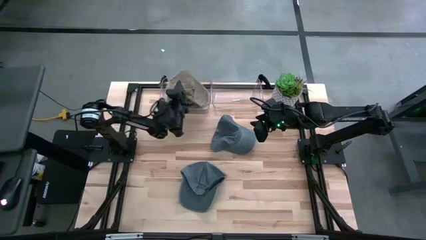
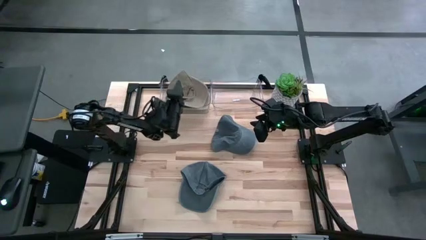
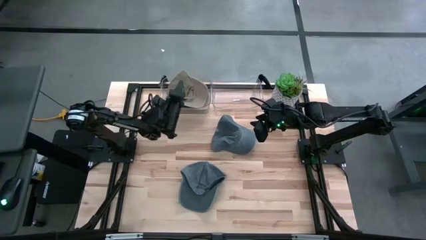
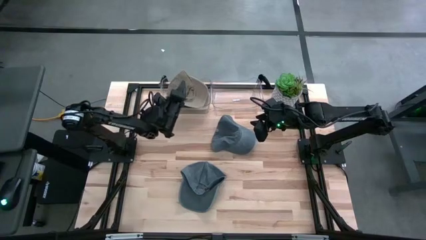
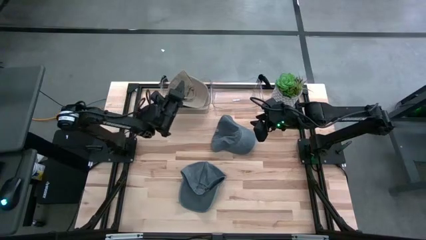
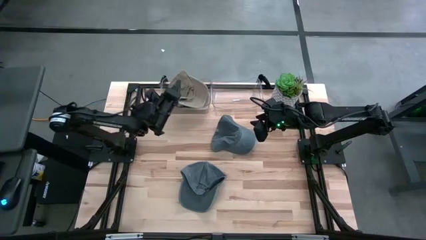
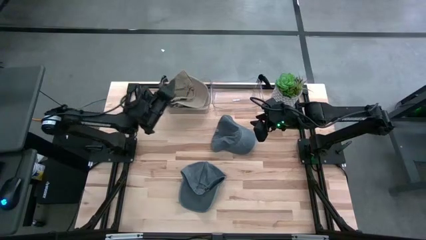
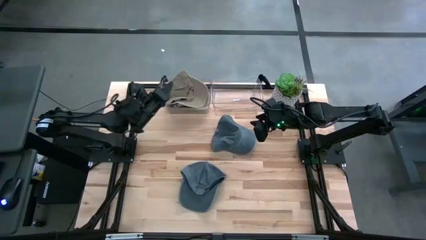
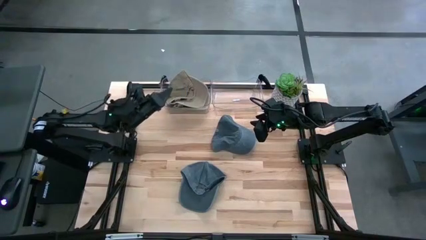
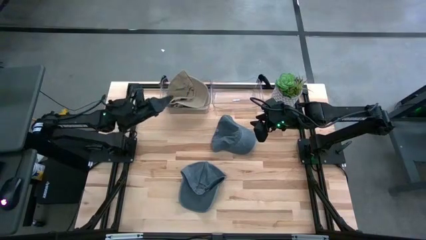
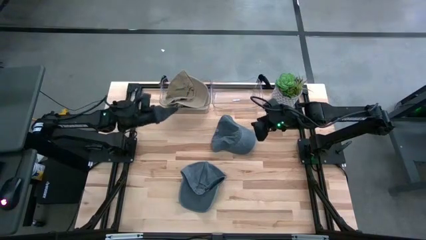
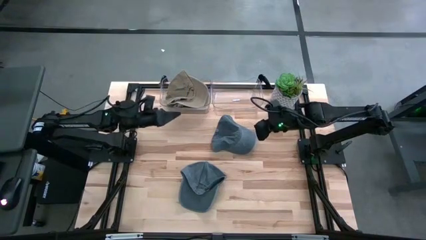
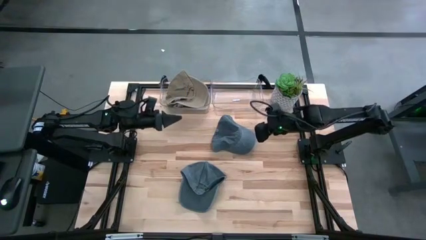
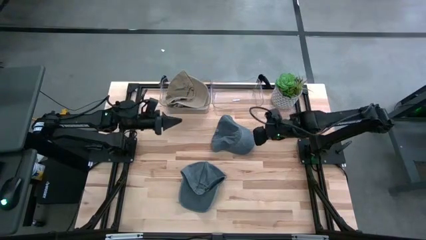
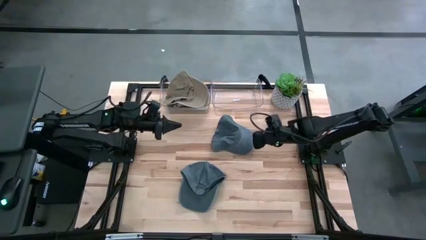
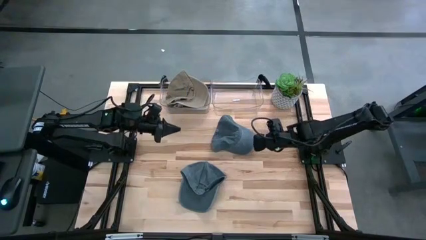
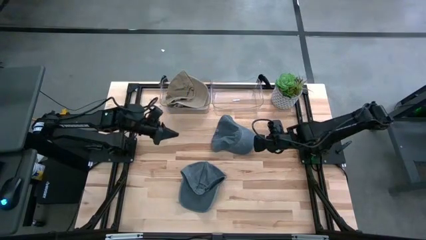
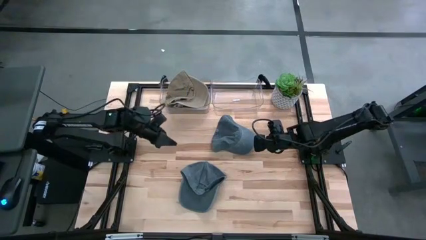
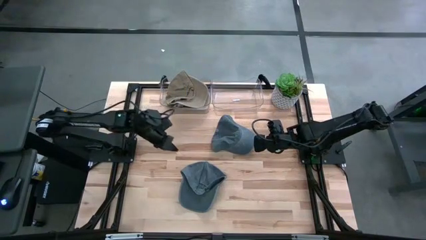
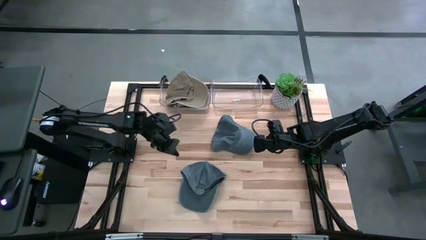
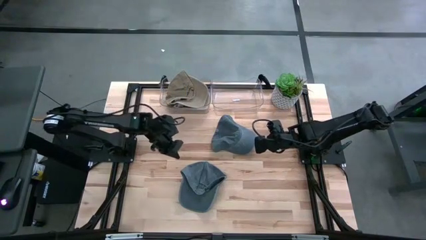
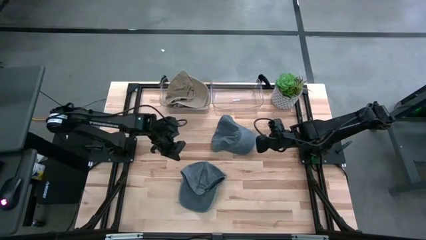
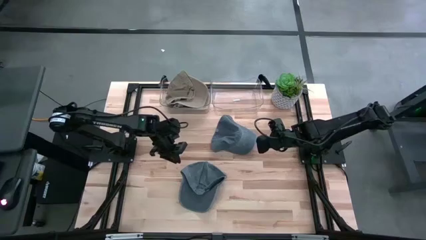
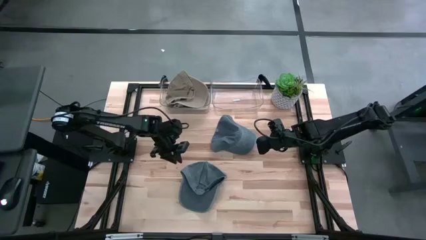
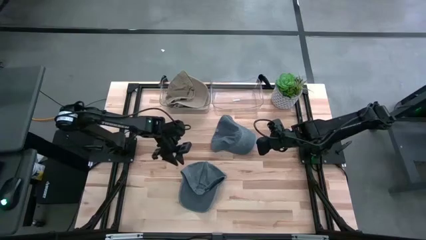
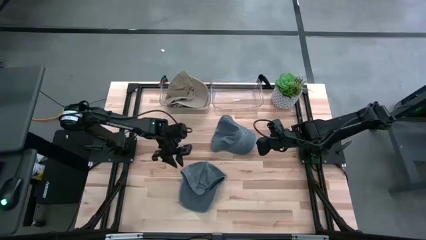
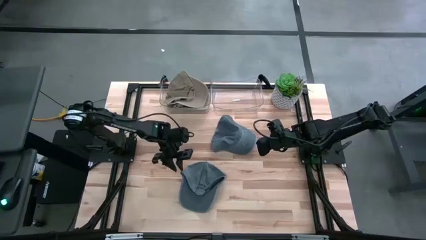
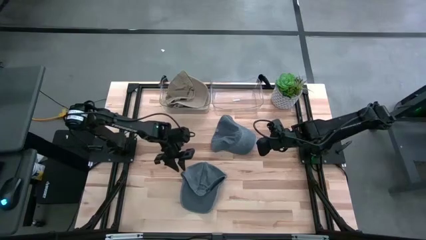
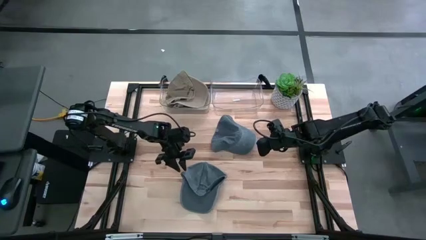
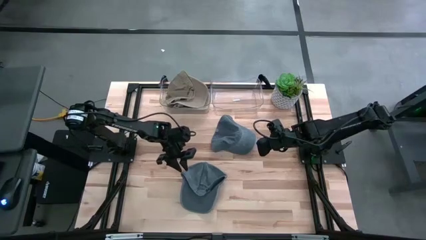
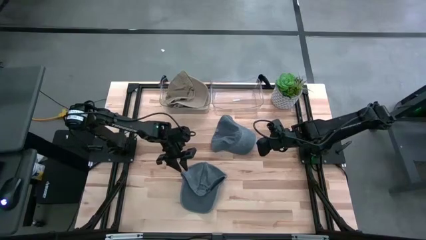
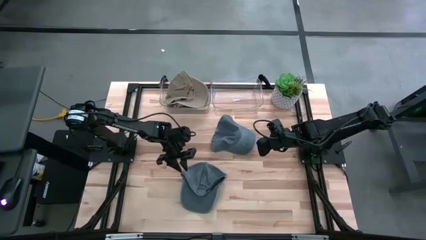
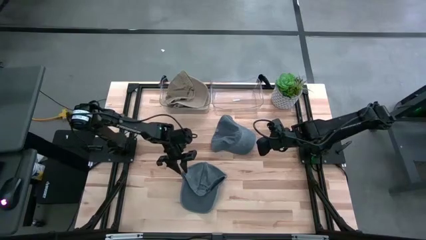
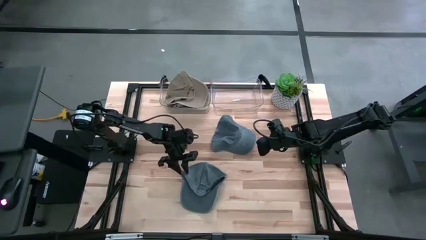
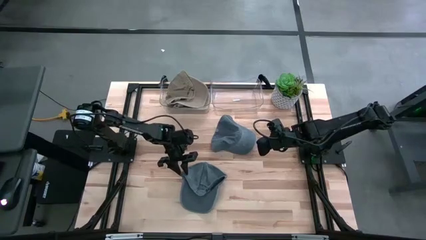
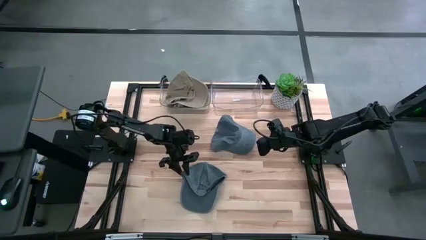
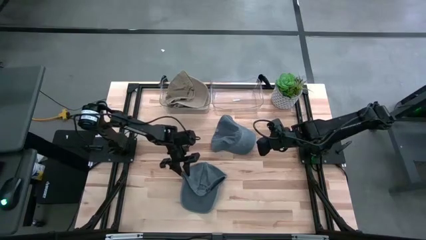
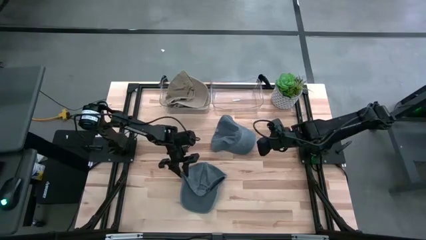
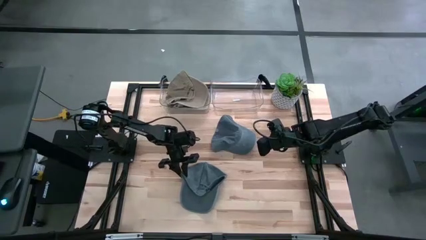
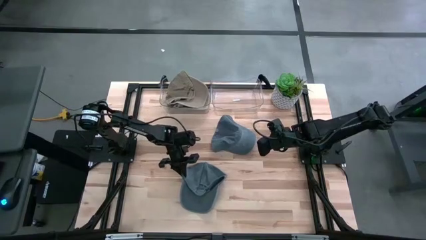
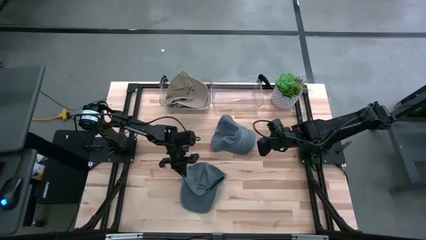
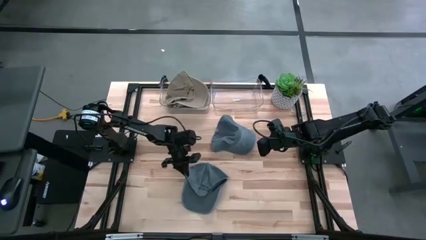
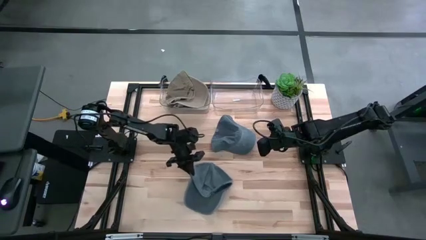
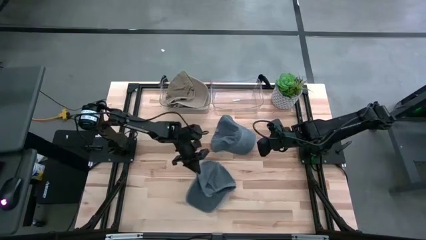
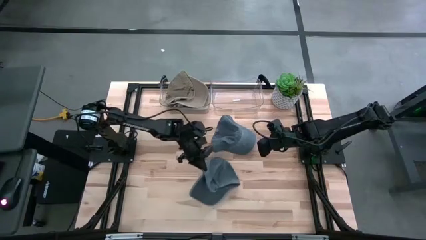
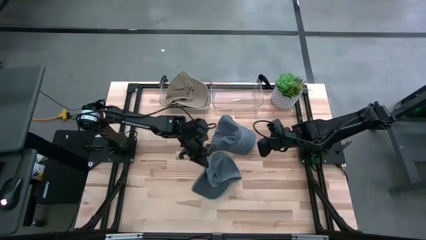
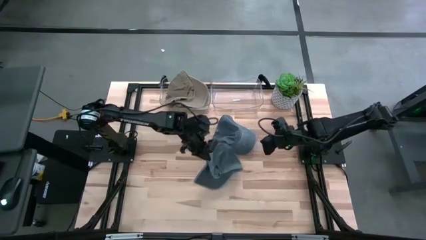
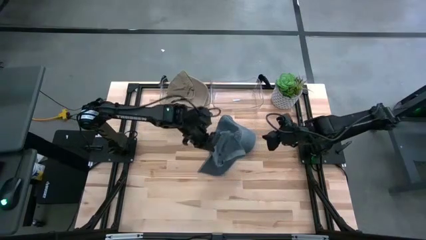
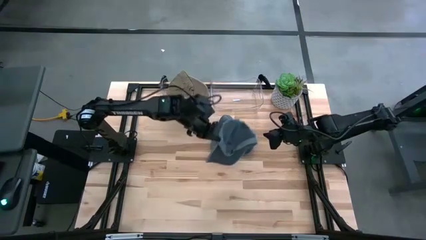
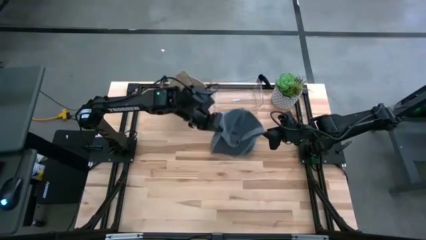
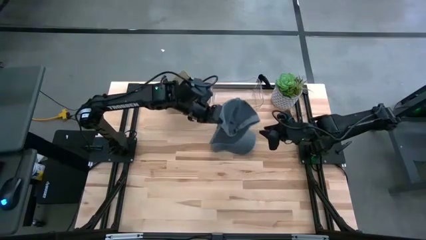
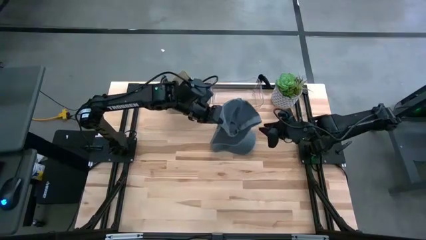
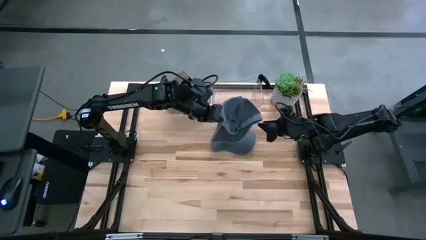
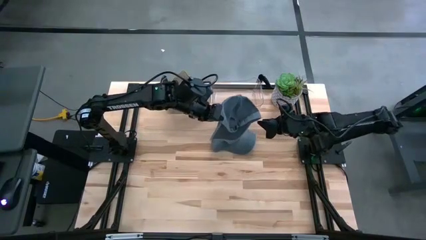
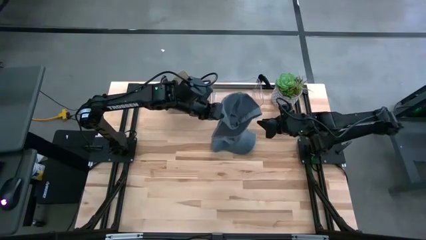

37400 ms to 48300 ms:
Task: Pick & Place hat
Put the bottom blue cap into the right transparent bin

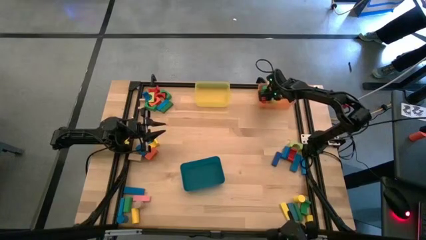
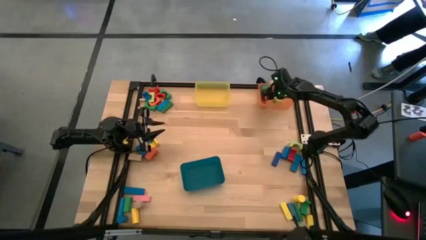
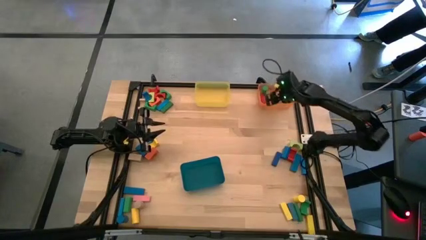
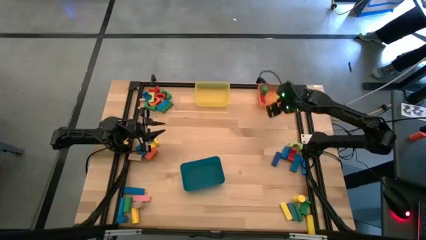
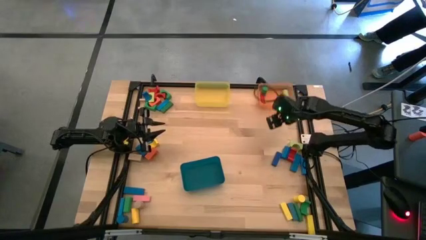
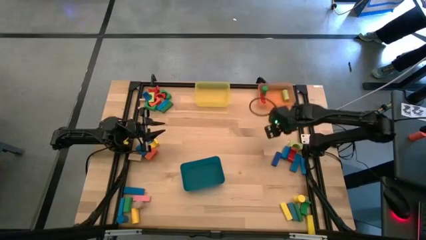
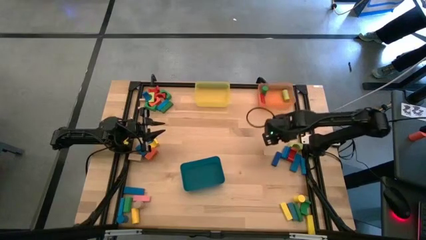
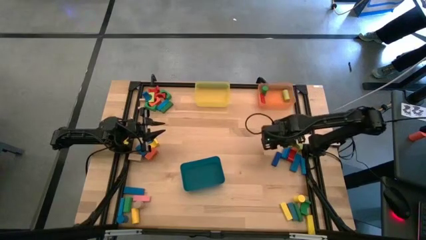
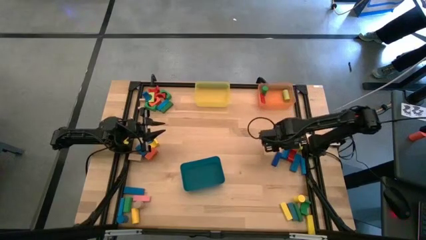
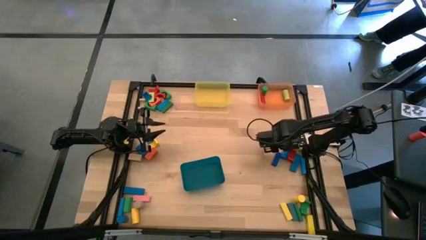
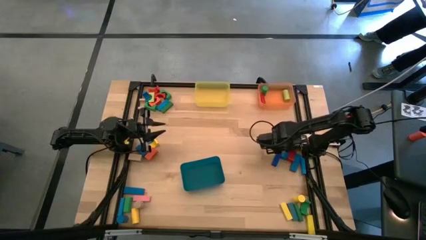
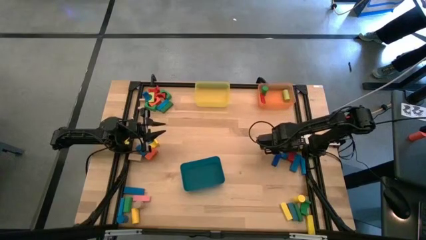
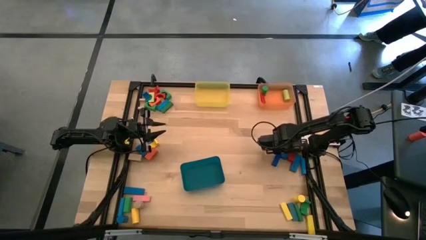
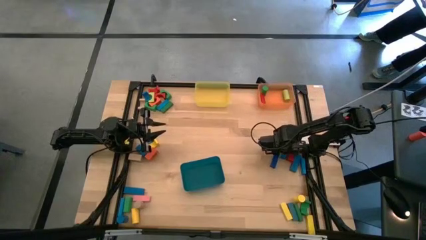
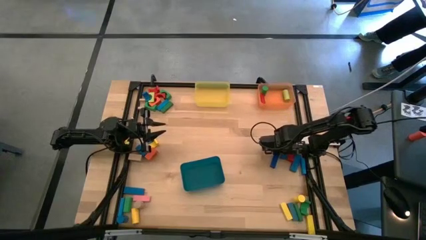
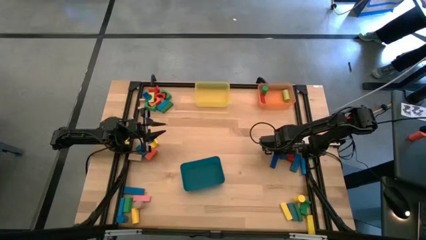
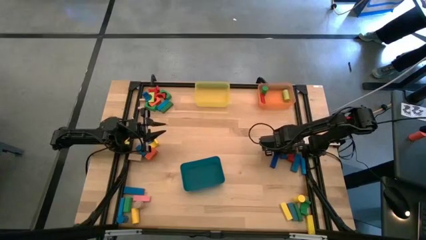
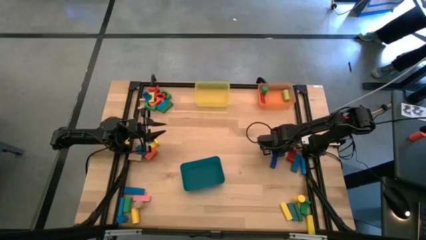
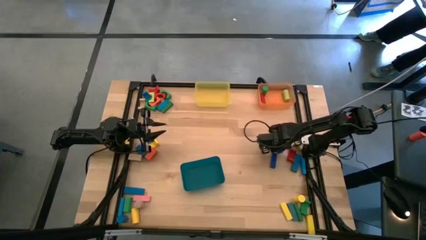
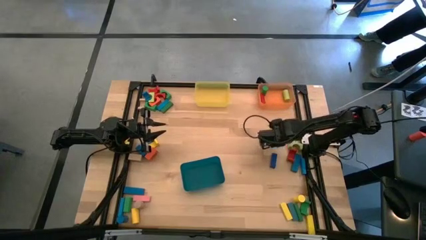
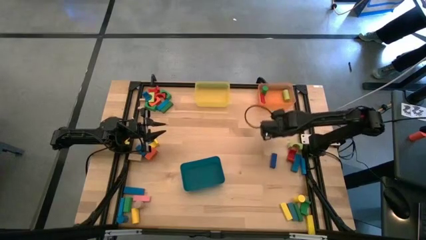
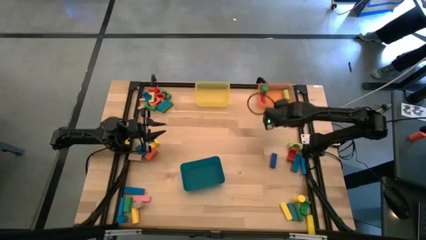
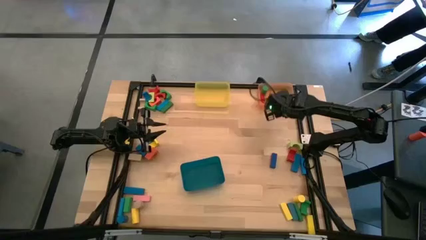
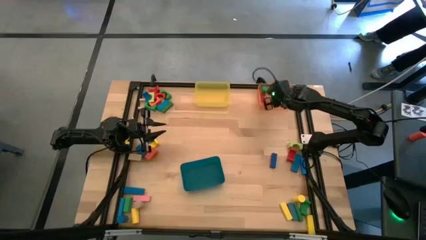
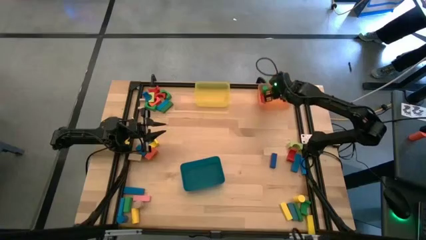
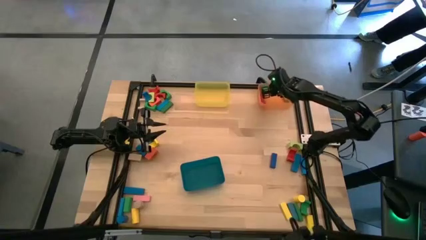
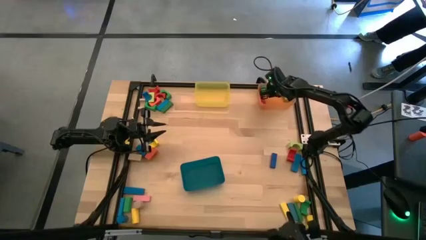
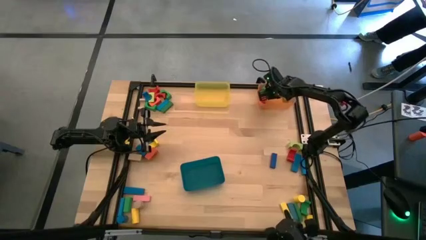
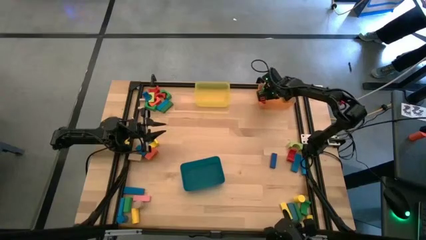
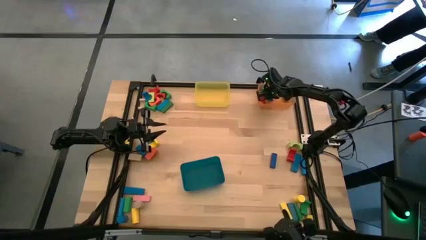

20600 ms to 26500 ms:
Task: Sort blocks by size
Put the blue cylindrical block into the orange bin
